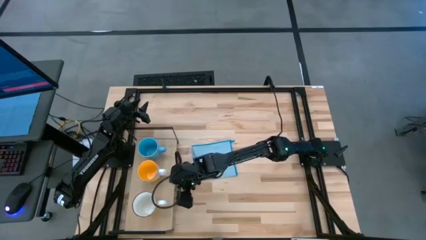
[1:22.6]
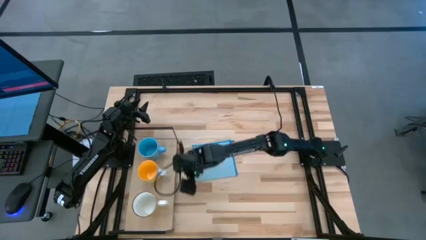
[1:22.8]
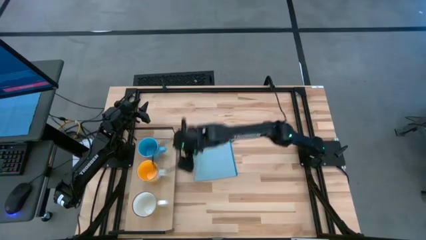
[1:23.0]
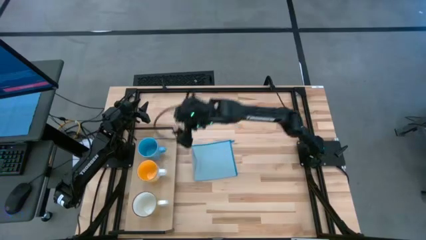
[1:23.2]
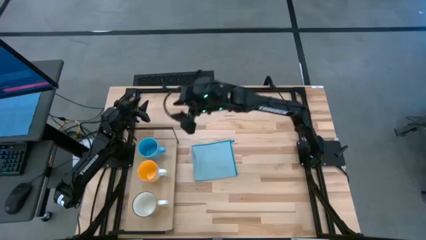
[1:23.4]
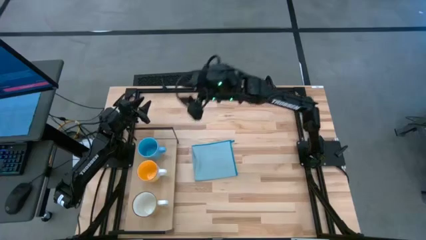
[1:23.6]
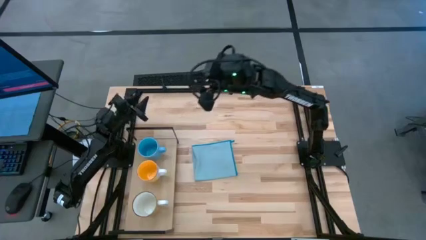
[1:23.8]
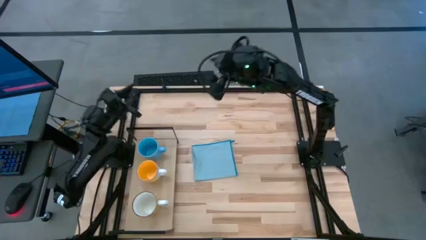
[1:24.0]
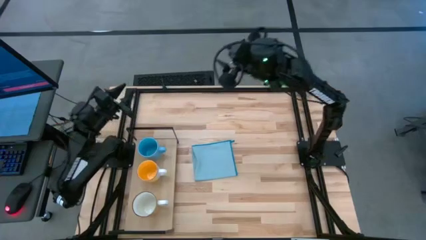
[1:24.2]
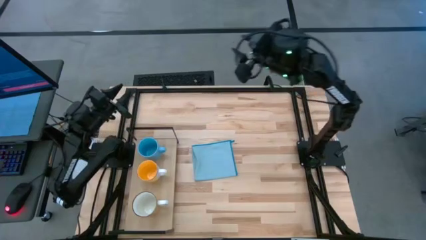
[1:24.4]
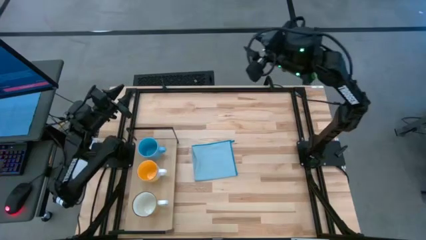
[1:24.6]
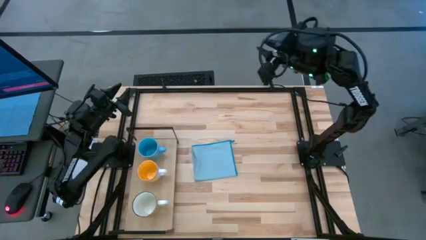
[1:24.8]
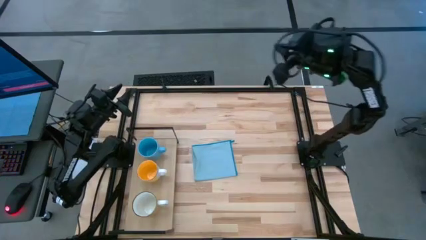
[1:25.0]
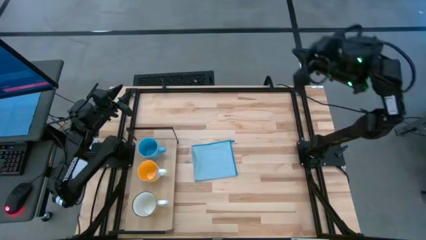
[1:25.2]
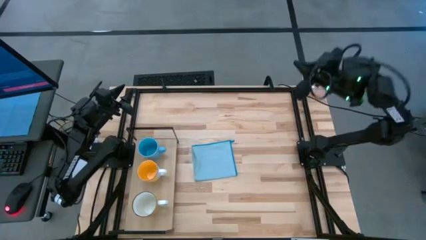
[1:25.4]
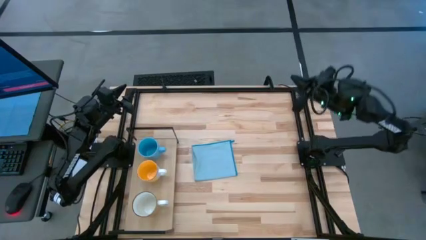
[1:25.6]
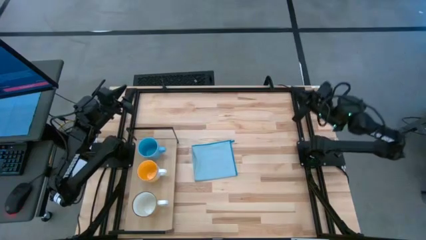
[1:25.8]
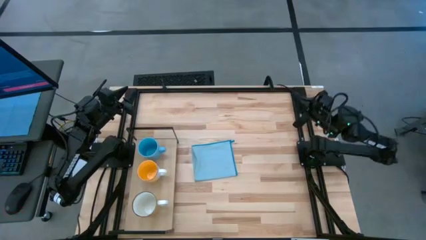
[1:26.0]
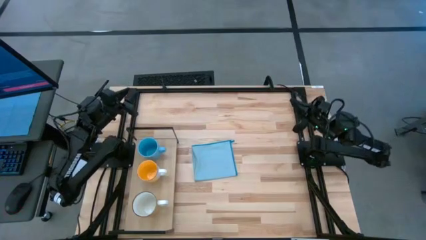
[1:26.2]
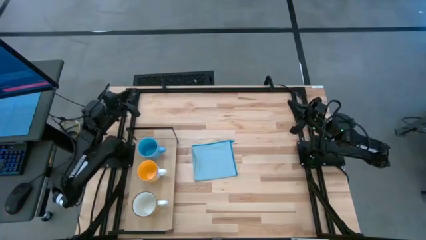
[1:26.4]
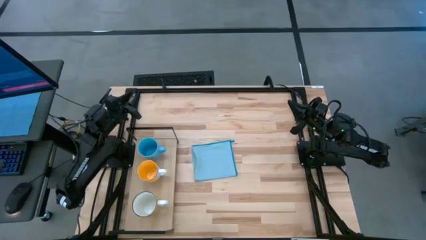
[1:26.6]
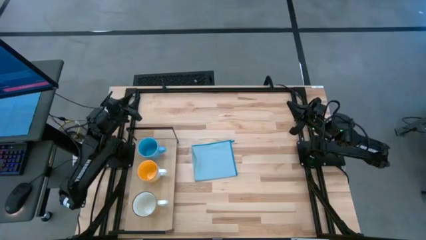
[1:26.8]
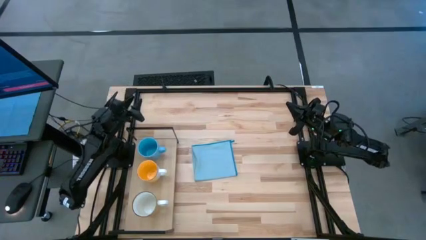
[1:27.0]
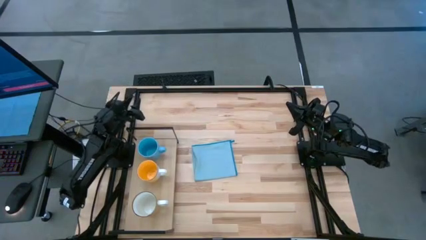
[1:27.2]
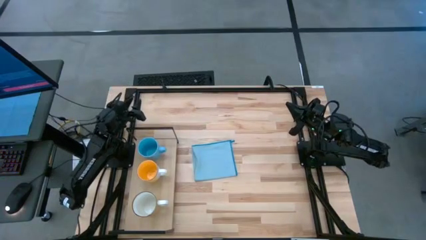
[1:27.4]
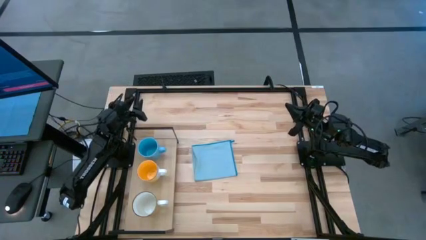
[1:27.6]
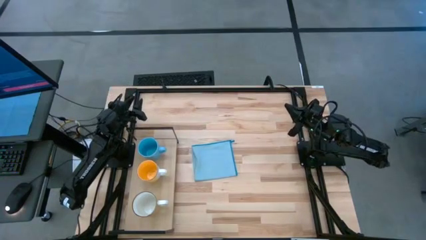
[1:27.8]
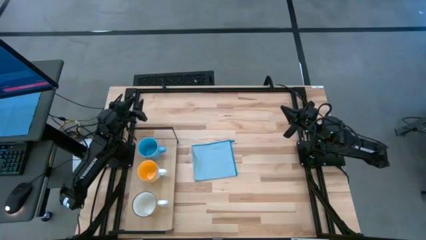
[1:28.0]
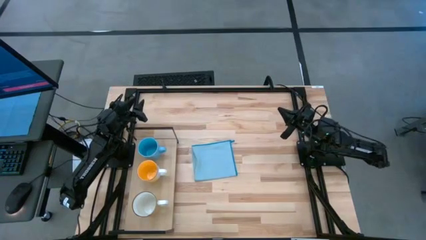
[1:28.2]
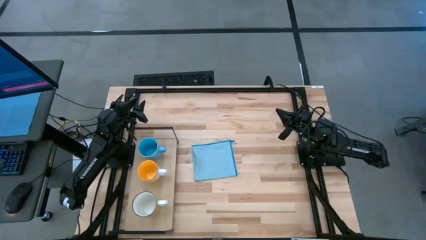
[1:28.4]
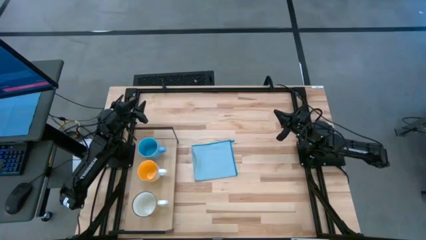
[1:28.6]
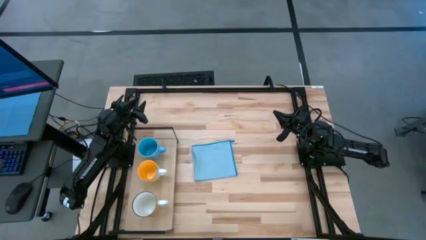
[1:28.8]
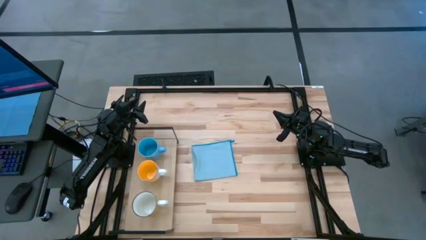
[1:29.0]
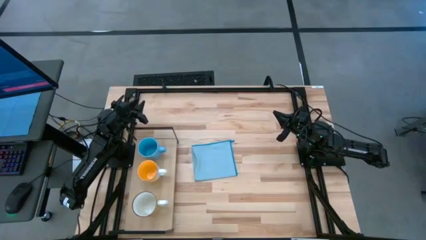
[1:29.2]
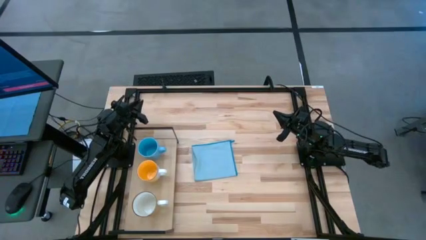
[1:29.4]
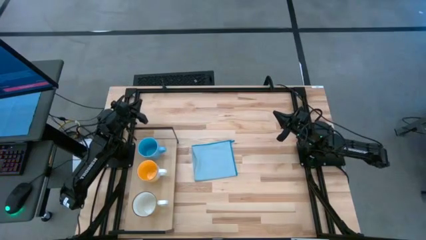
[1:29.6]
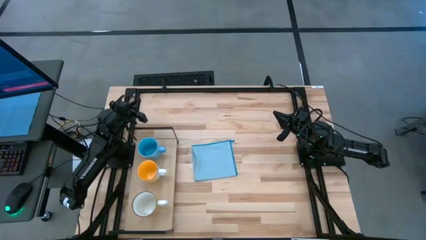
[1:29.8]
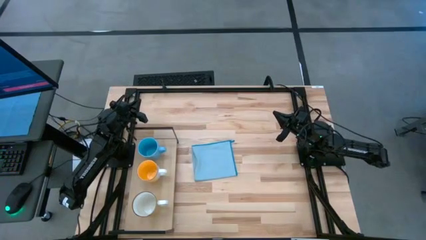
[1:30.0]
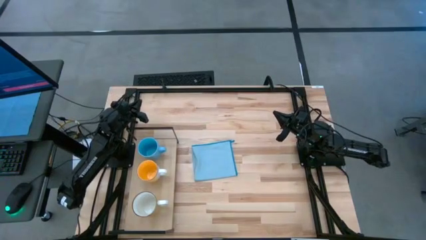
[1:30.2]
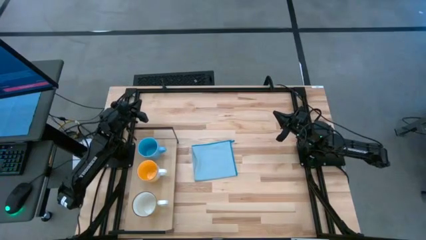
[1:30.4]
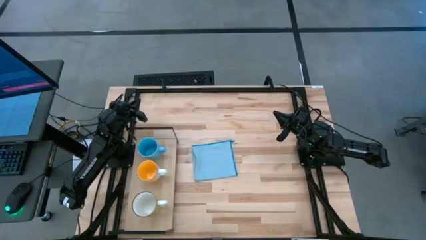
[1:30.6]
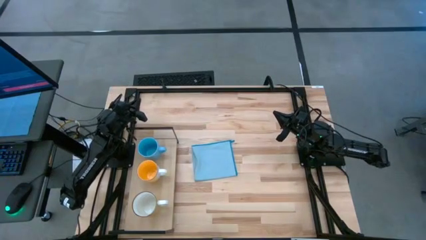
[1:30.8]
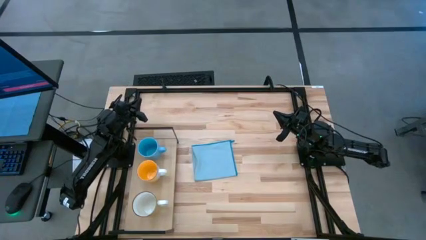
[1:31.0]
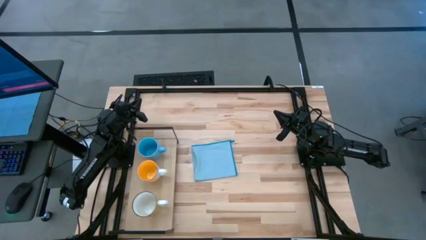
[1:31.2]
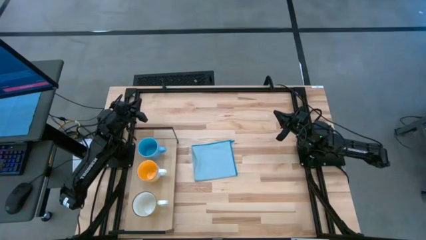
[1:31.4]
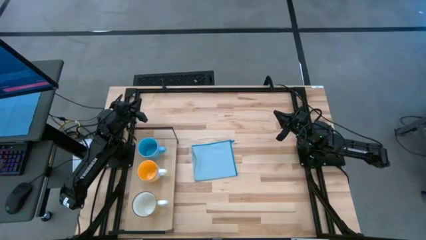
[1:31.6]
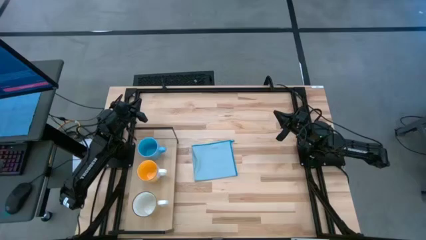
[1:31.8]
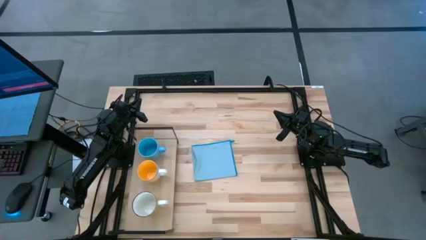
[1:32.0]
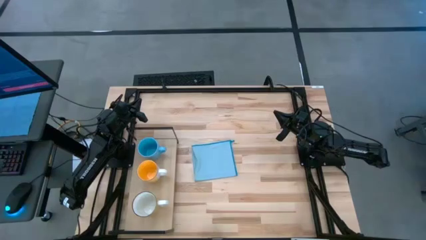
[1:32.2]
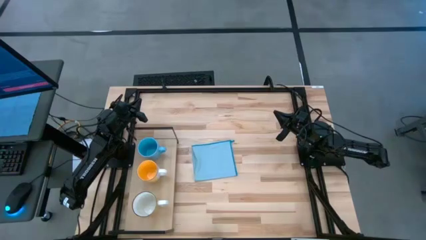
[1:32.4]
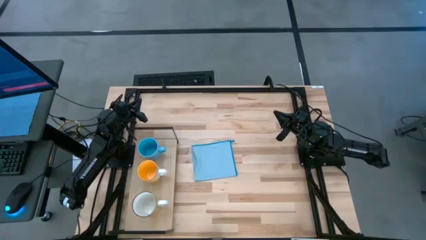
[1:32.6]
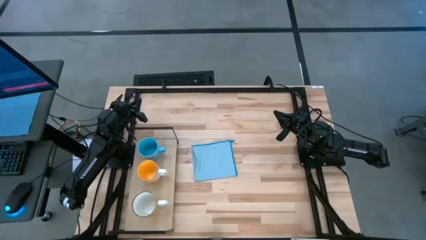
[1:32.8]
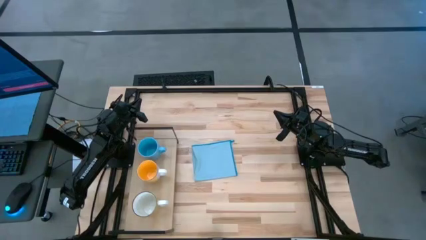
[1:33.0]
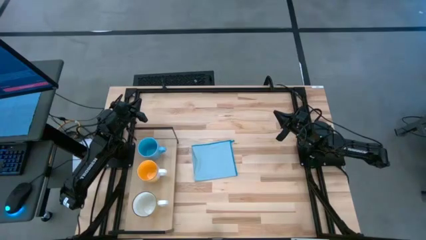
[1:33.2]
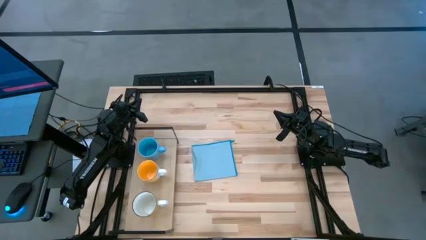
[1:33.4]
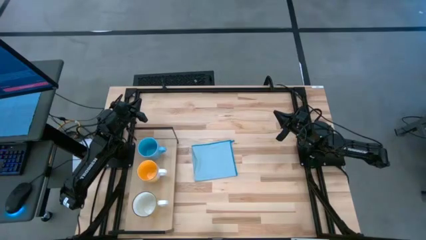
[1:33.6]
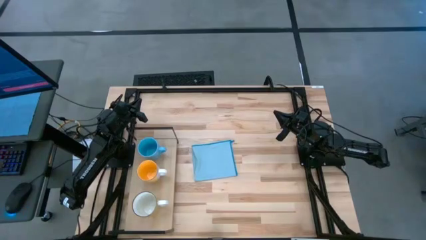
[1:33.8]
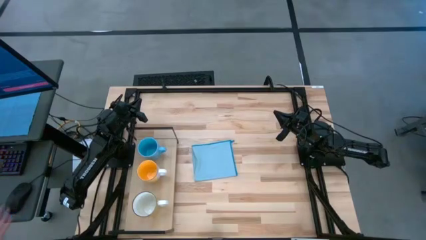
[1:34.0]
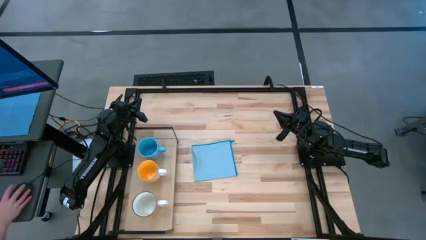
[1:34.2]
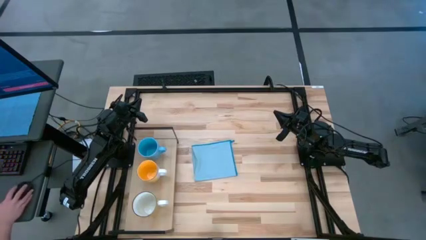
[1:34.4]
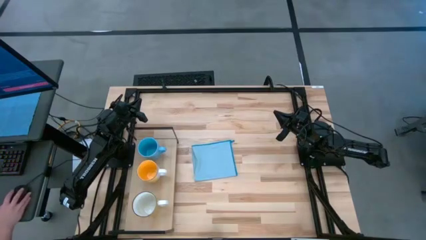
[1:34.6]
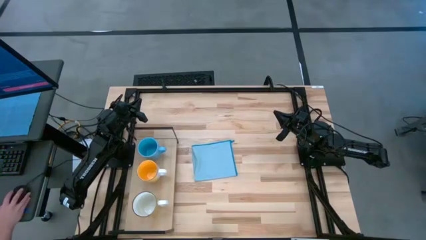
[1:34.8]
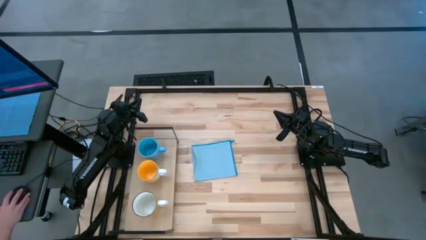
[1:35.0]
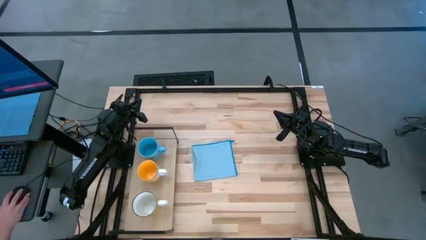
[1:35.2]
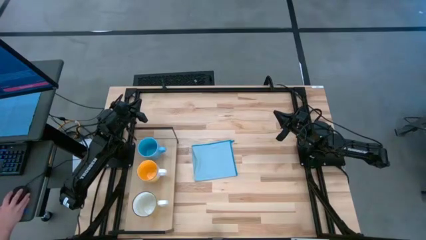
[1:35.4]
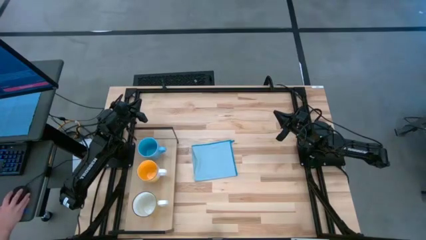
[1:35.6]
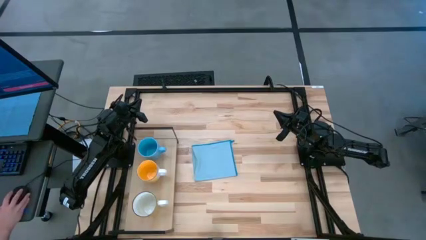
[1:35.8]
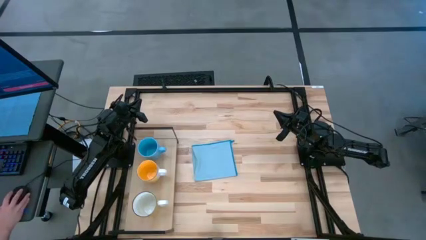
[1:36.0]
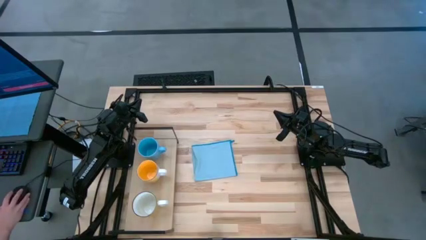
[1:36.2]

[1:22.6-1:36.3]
Task: Stack small to large cups/mugs on shelf
Return to Home Position
